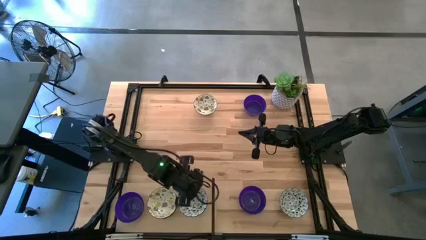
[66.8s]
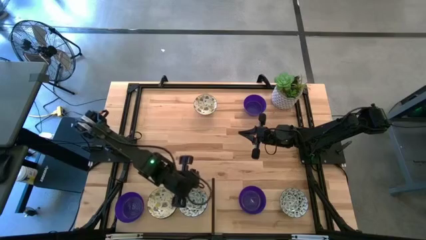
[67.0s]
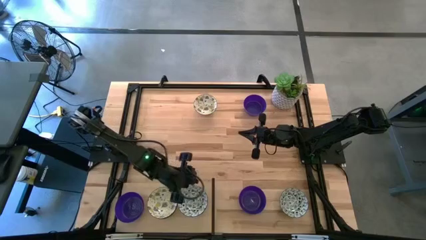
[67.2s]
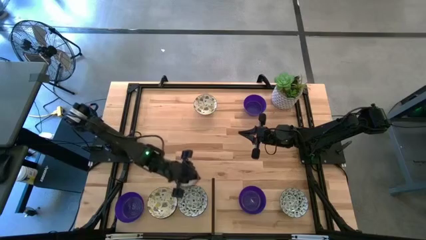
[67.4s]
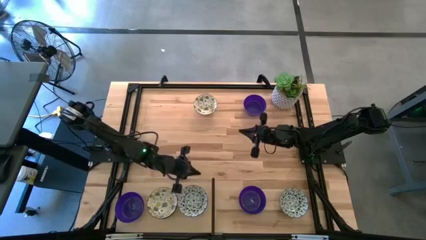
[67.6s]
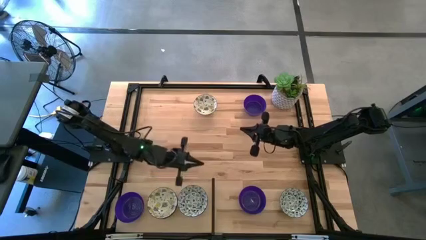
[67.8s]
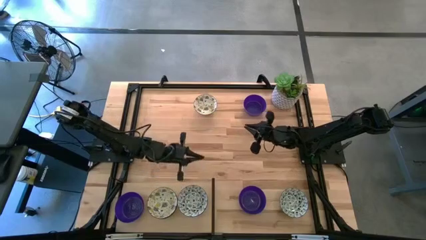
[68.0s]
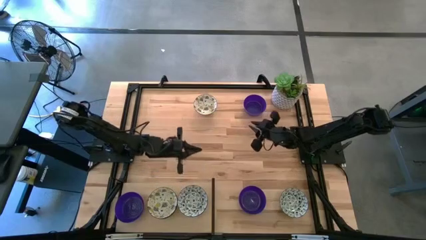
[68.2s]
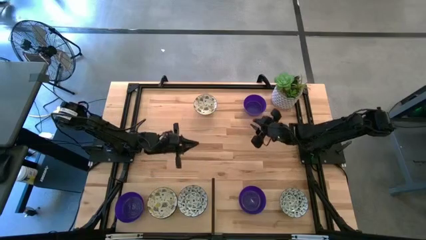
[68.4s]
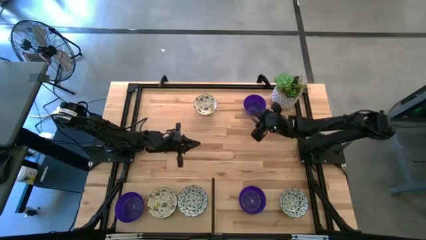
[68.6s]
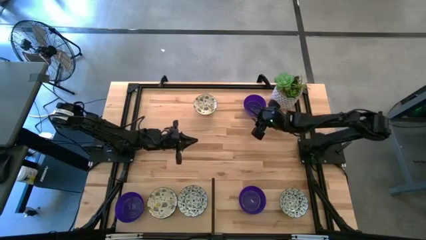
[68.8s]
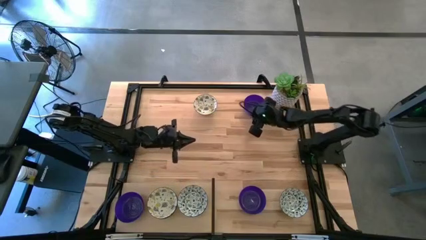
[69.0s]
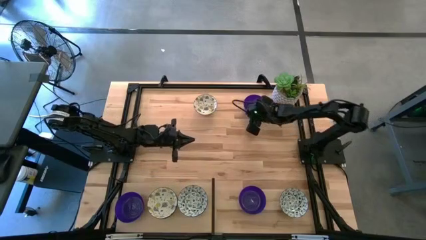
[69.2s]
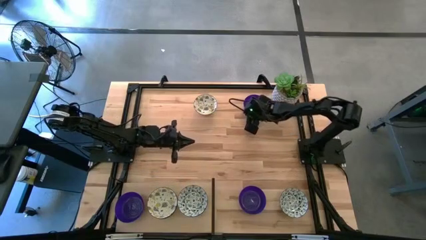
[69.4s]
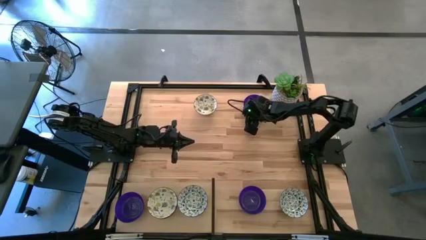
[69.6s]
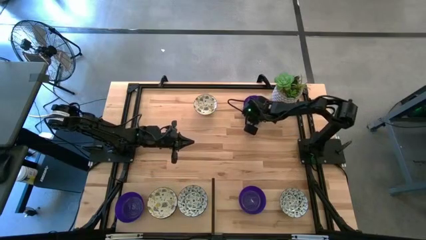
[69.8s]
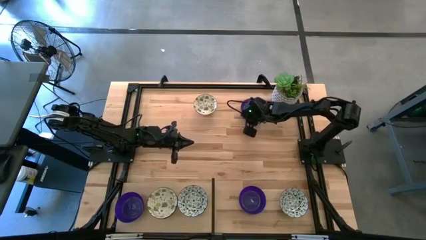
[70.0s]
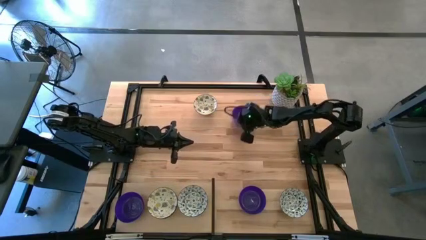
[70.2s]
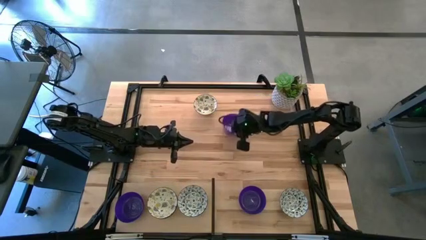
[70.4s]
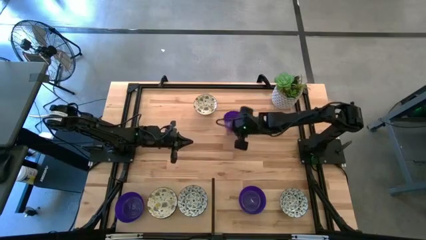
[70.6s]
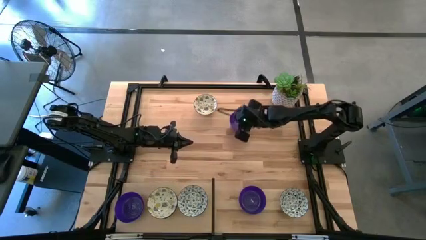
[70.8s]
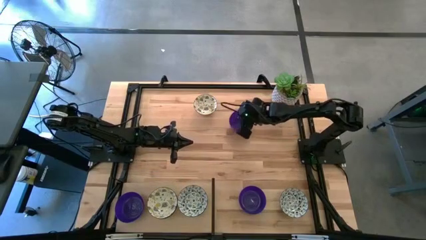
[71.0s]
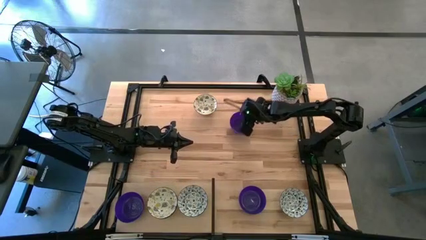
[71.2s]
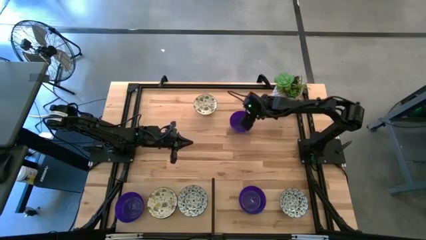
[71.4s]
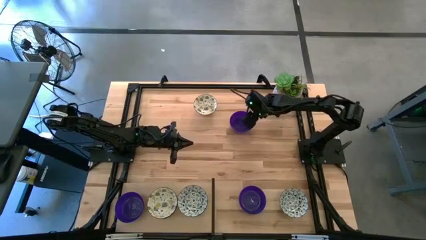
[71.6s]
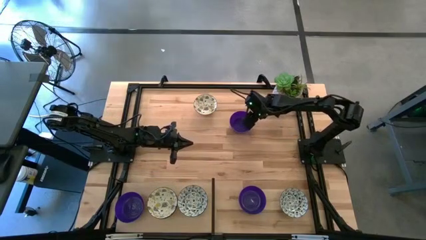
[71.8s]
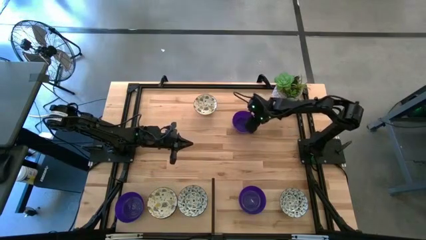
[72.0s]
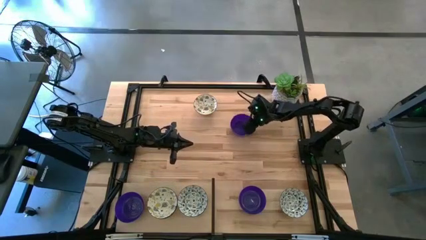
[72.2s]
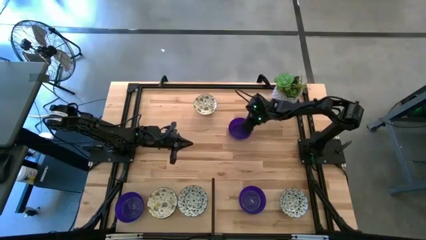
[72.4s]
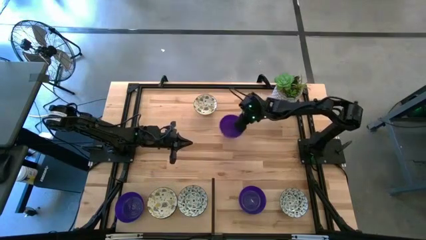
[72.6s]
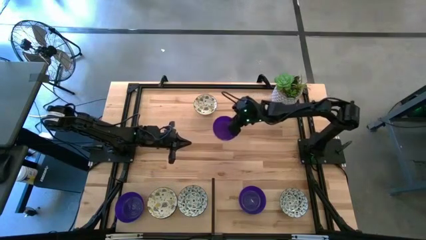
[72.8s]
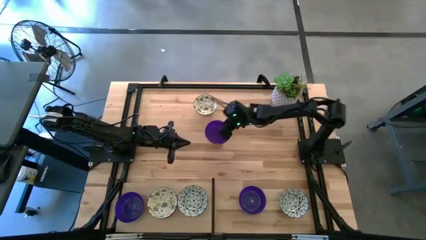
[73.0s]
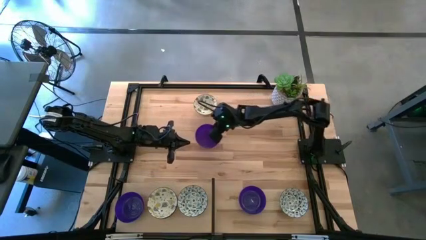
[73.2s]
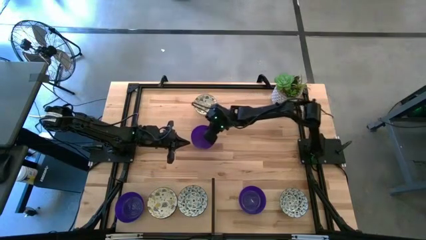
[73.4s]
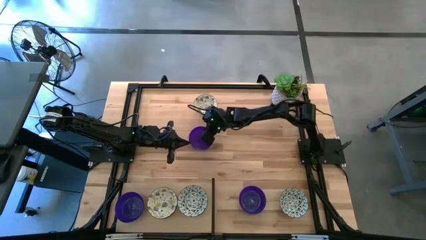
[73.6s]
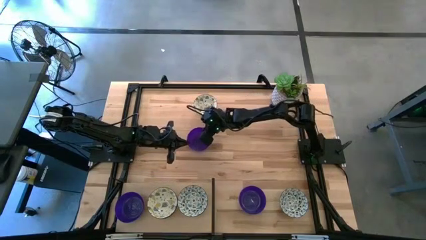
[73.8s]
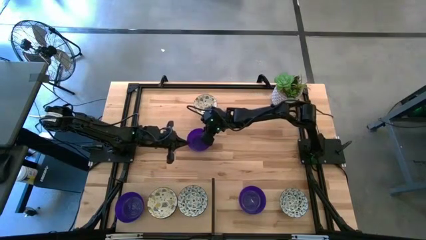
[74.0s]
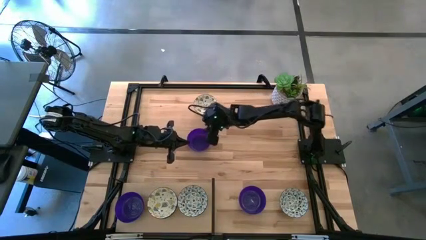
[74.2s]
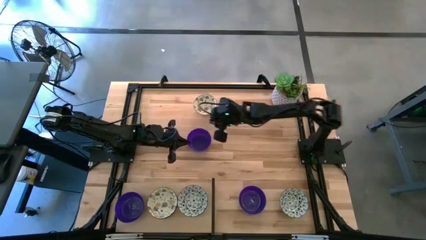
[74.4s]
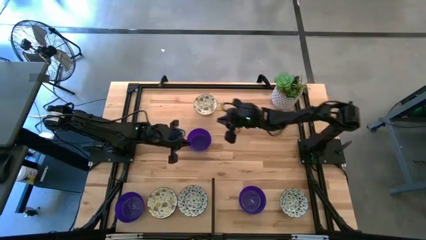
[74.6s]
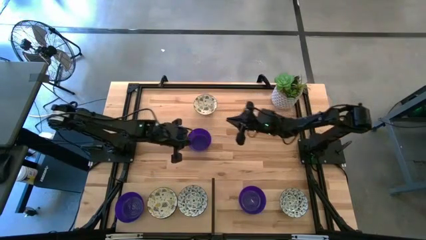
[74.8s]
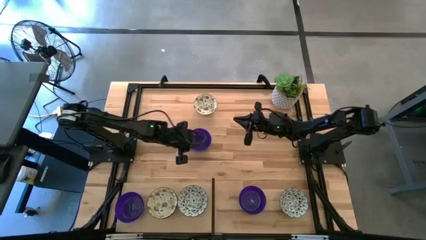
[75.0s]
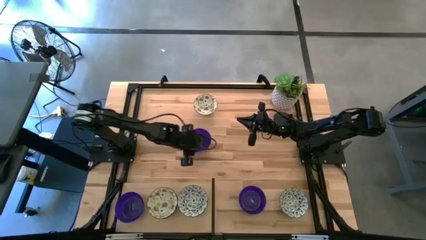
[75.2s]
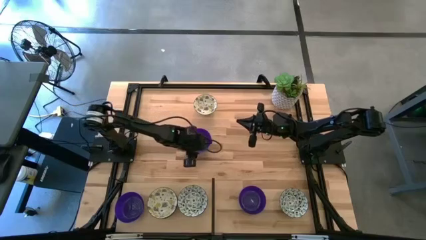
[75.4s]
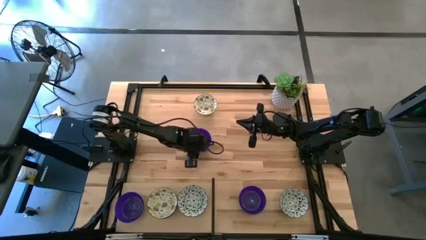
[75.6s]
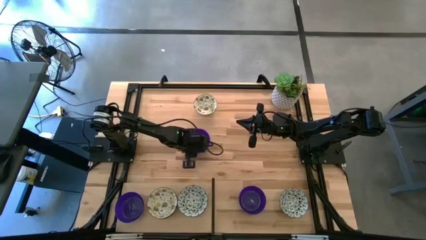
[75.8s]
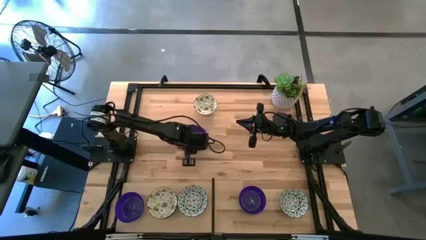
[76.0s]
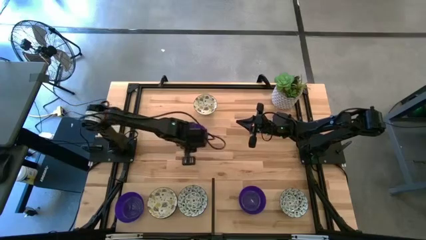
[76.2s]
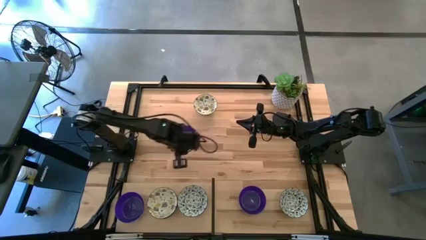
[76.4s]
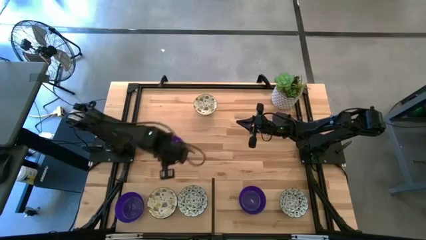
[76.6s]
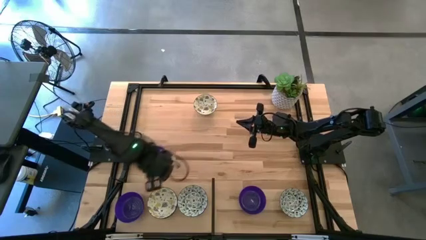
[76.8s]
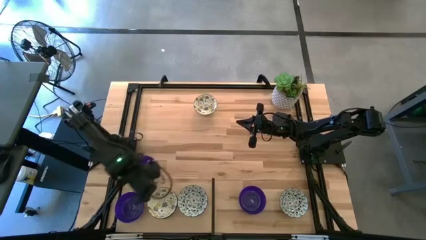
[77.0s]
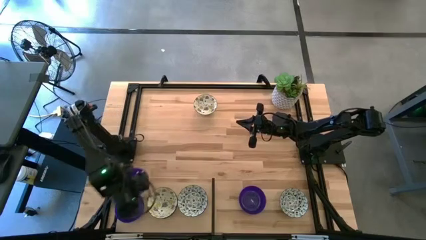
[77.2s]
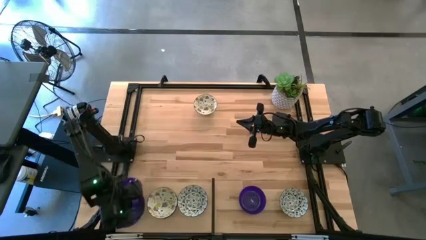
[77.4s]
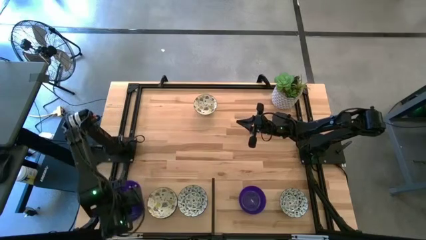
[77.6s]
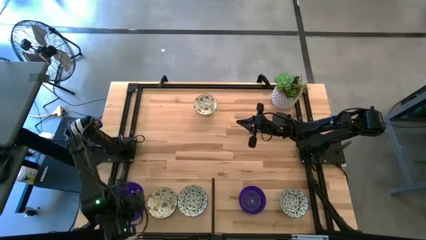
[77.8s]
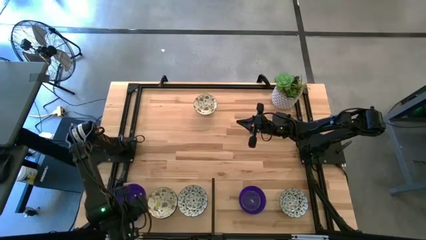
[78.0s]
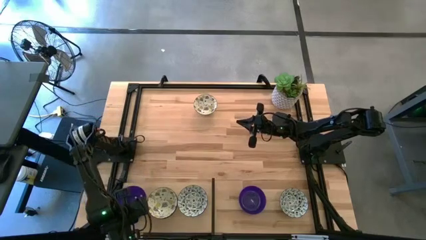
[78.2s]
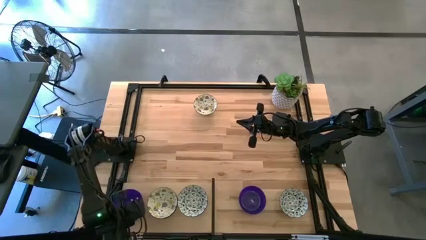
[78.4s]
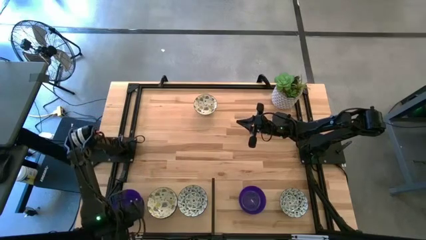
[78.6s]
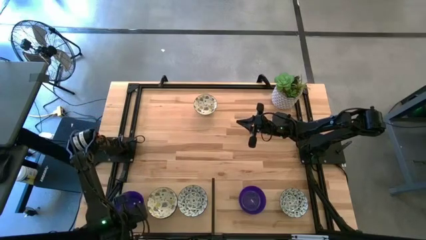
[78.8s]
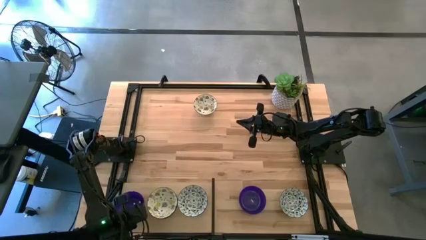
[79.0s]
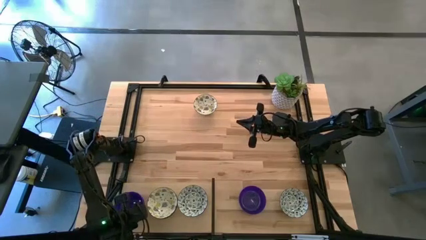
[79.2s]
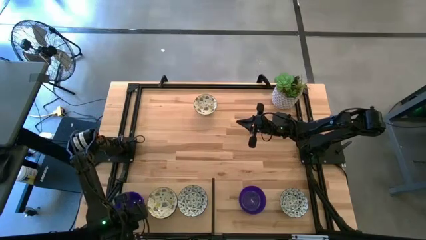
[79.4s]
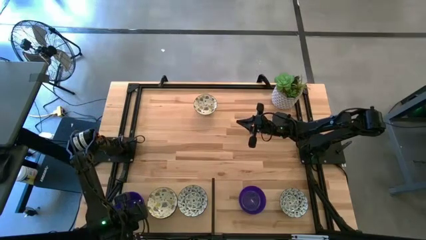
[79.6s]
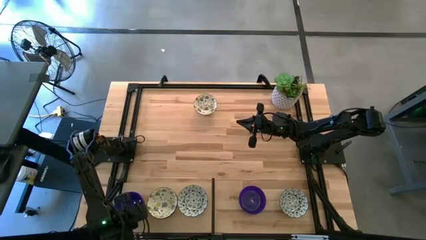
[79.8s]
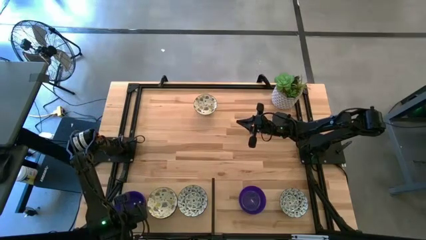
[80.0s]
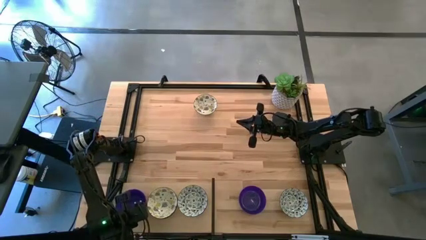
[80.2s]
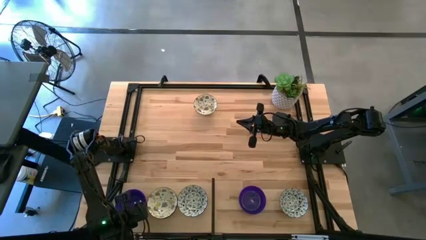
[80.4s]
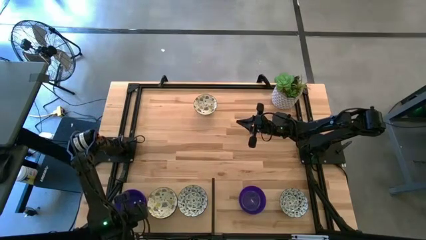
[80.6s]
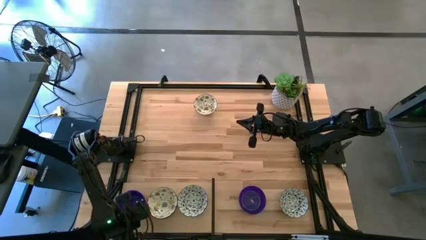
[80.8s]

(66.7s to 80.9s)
Task: Pick & Place Mini bowls
Stack the top violet bowl on top of the other violet bowl on the shelf

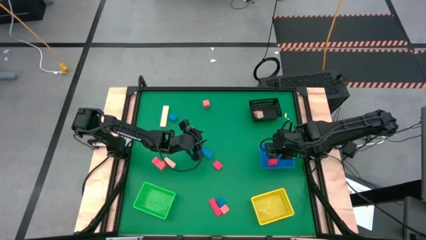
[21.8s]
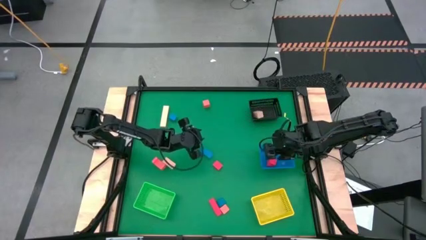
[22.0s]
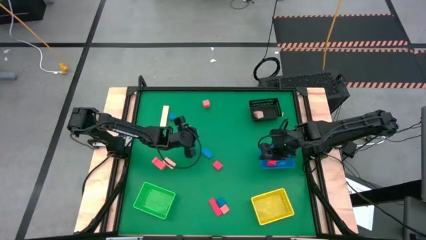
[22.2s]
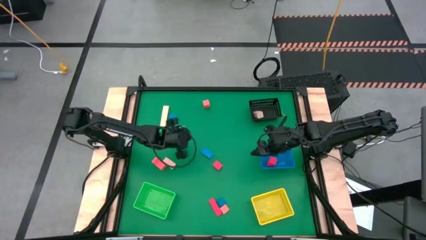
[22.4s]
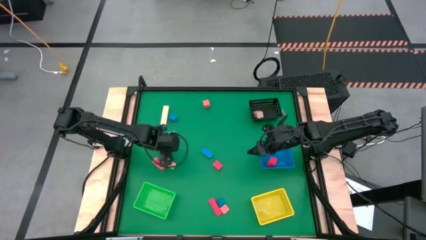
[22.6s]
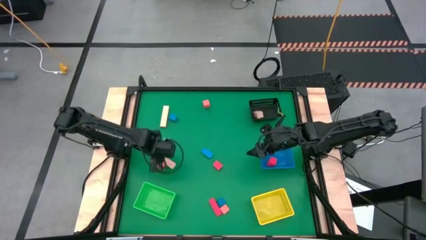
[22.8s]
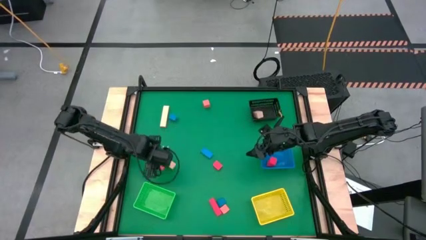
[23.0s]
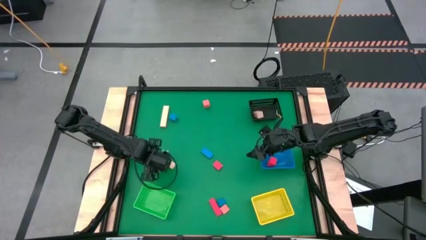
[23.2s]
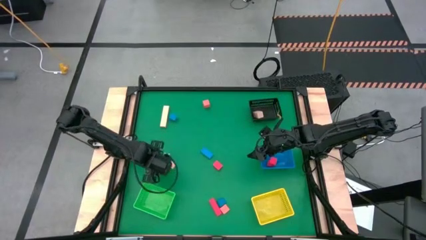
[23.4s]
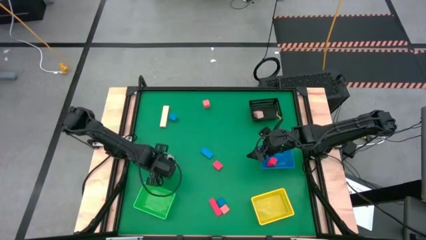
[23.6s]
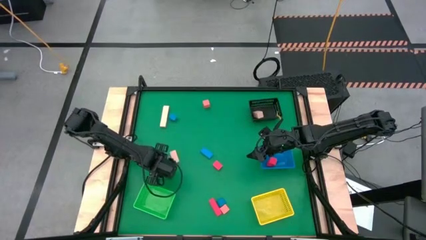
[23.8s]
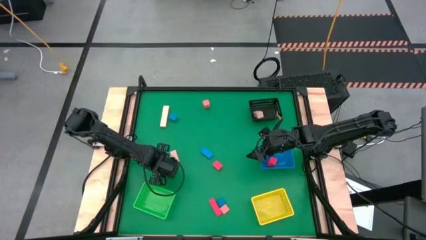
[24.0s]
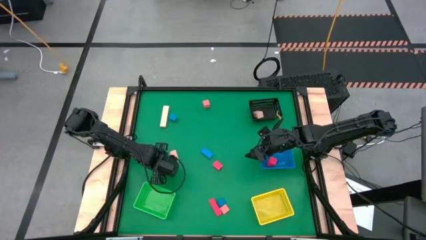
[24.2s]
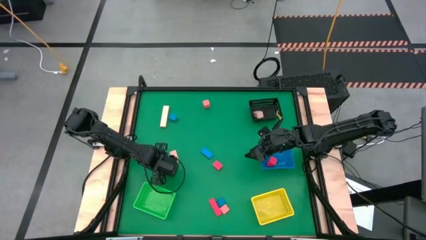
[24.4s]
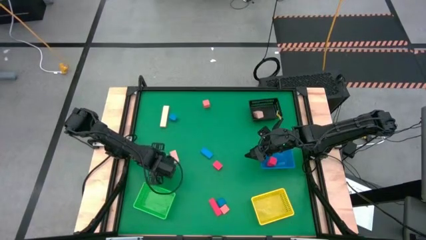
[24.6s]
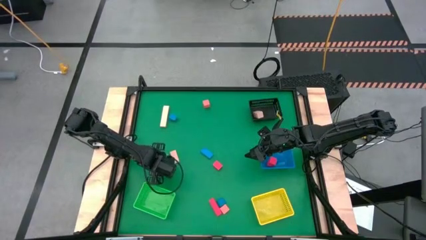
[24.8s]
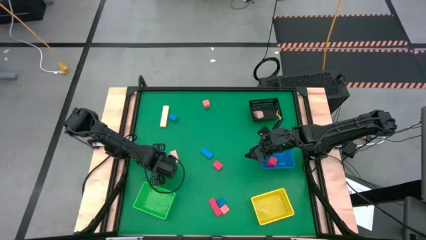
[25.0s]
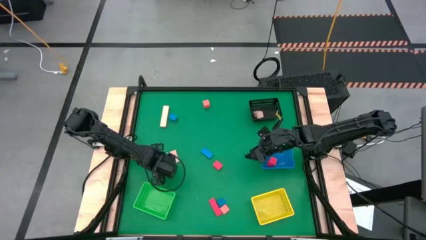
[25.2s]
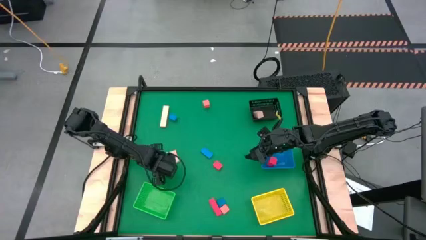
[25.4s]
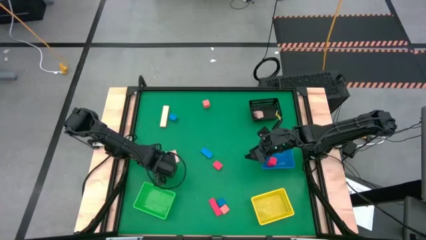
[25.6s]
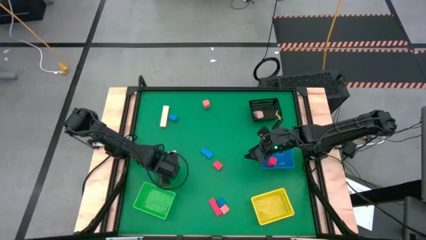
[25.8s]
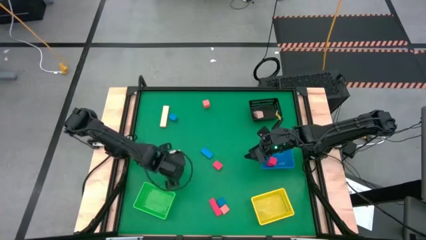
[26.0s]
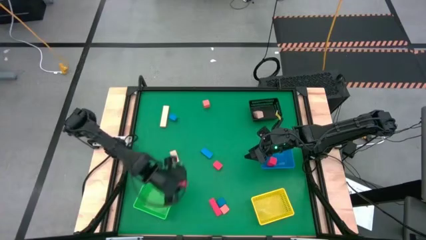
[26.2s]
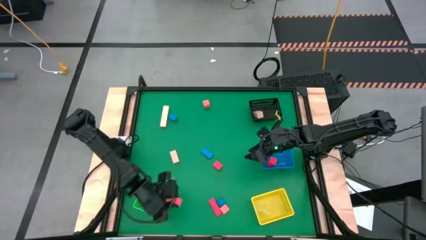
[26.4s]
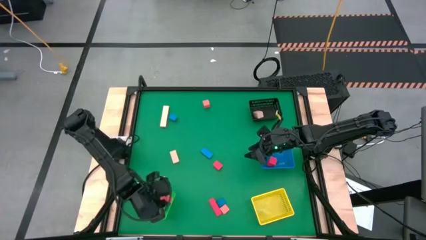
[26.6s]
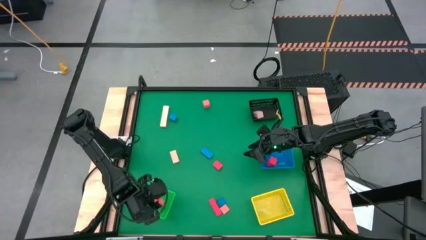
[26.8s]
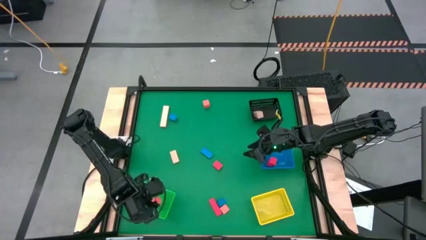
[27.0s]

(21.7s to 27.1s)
Task: Sort & place blocks by color
Put the orange block into the green bin
